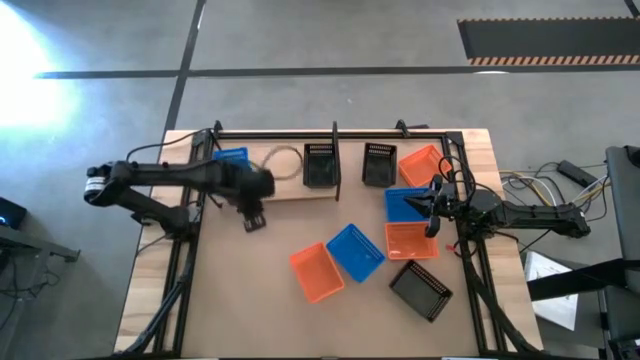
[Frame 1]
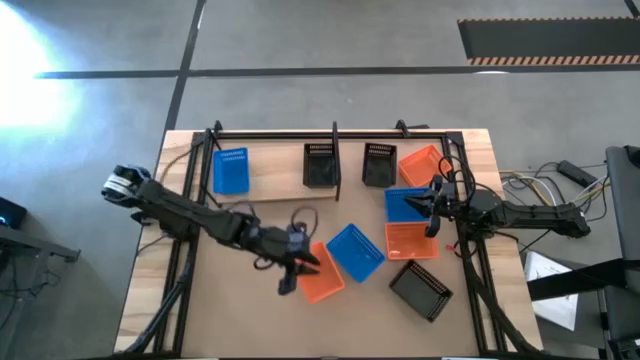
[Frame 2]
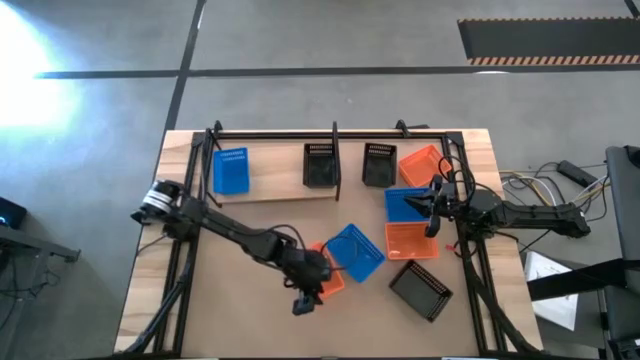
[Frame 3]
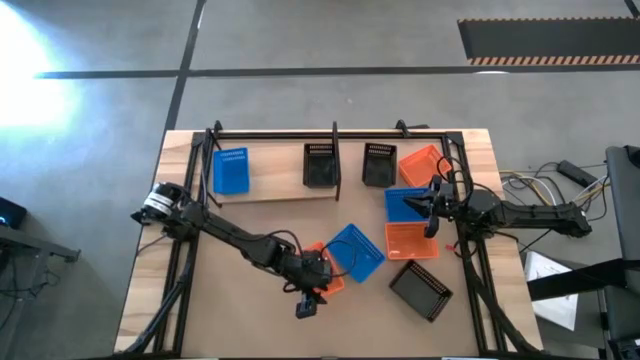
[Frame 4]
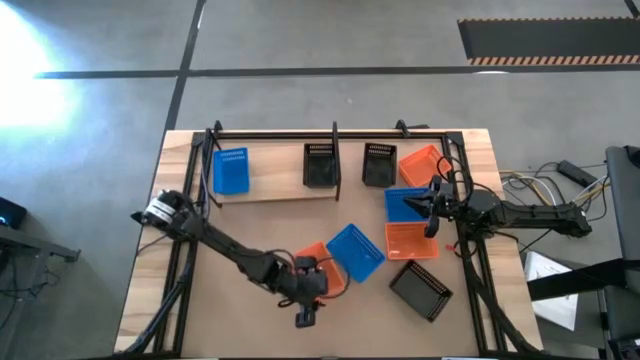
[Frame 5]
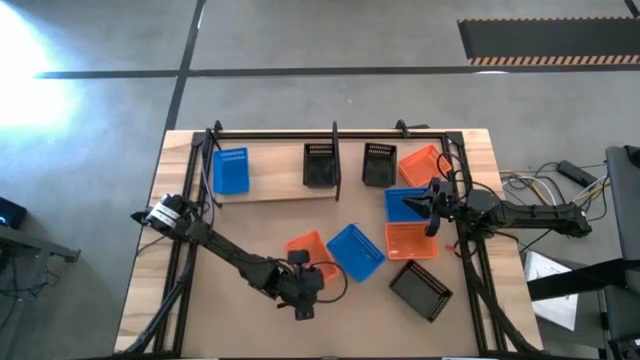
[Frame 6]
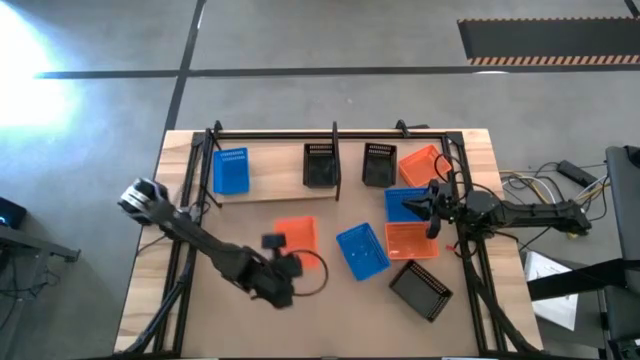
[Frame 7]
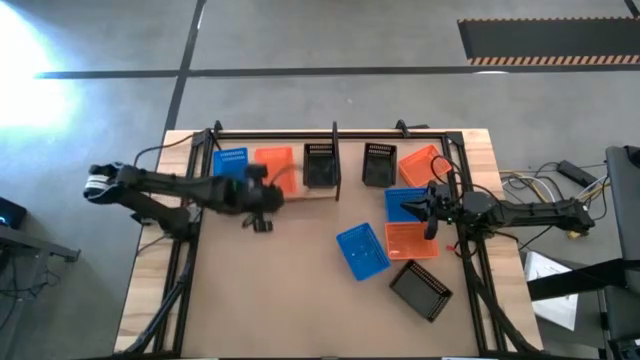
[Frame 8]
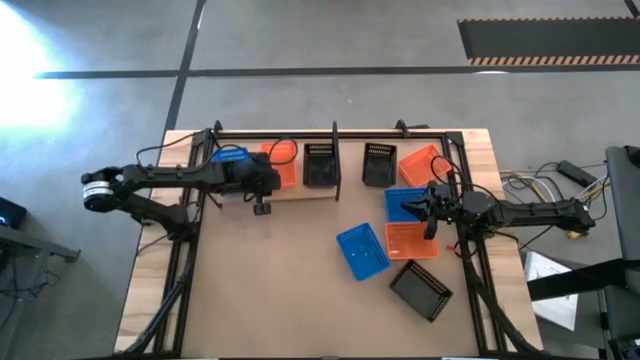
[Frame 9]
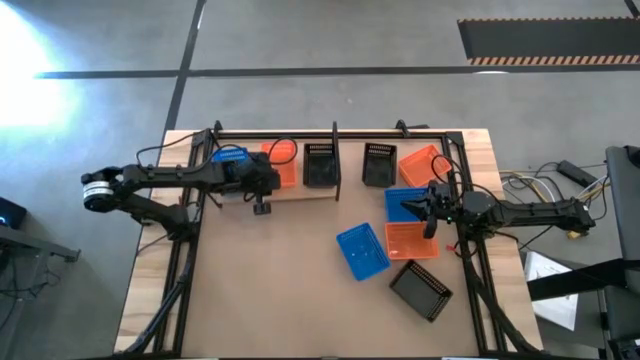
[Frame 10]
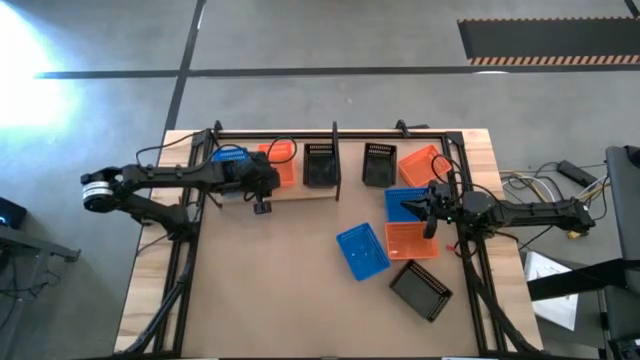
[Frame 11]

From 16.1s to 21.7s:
Task: Stack baskets on shelf by color
Put the bottom left orange basket on the shelf

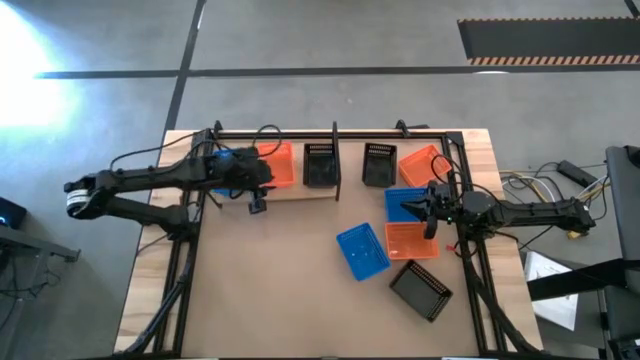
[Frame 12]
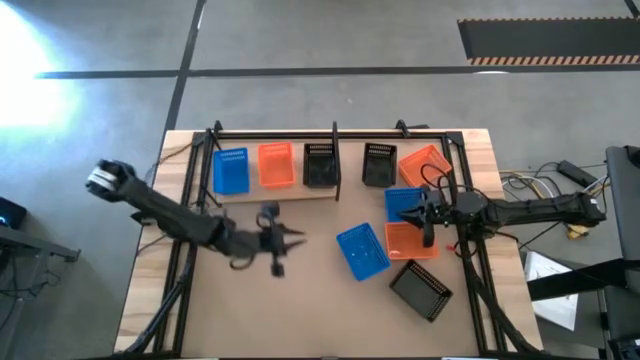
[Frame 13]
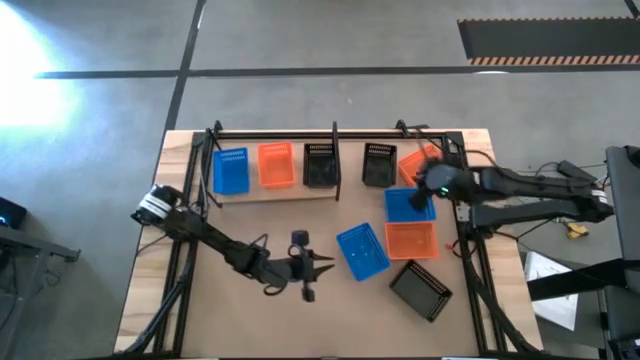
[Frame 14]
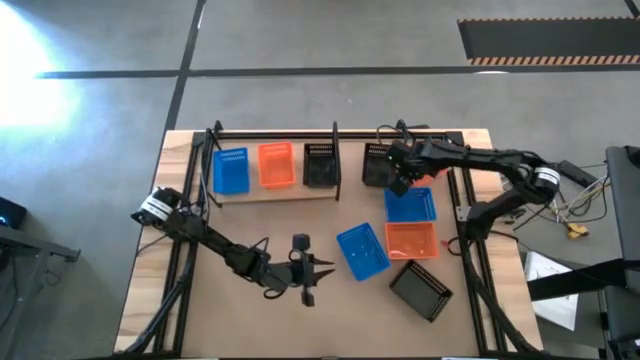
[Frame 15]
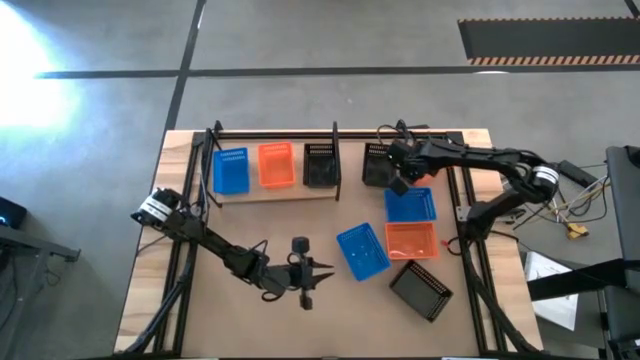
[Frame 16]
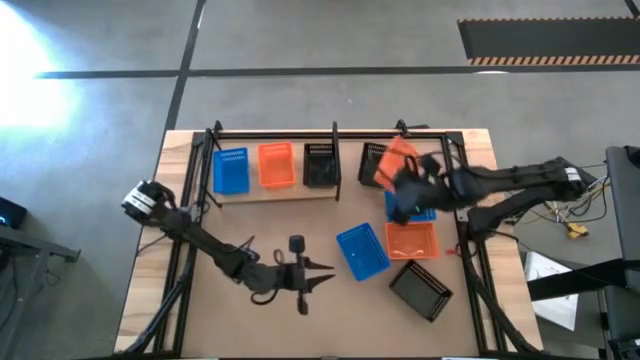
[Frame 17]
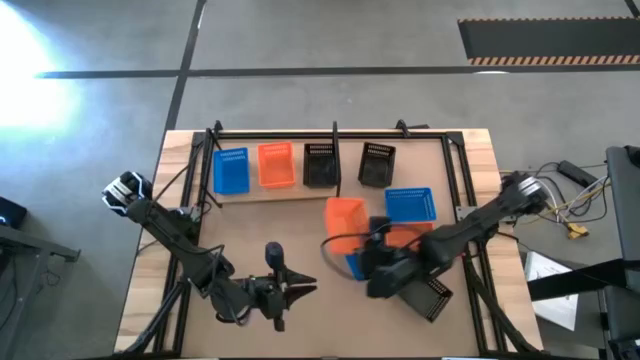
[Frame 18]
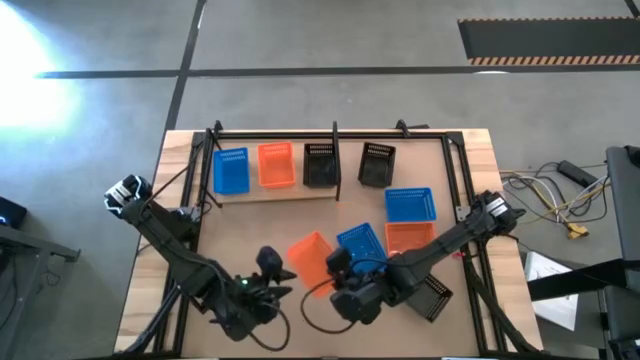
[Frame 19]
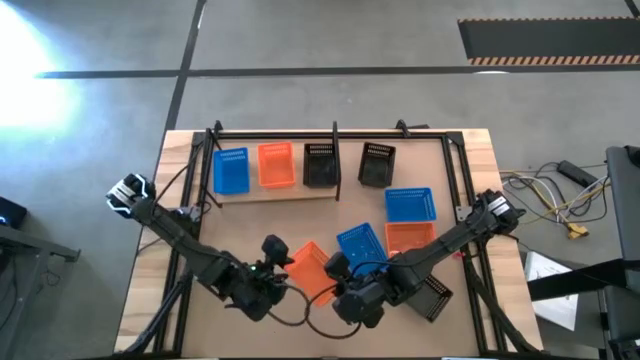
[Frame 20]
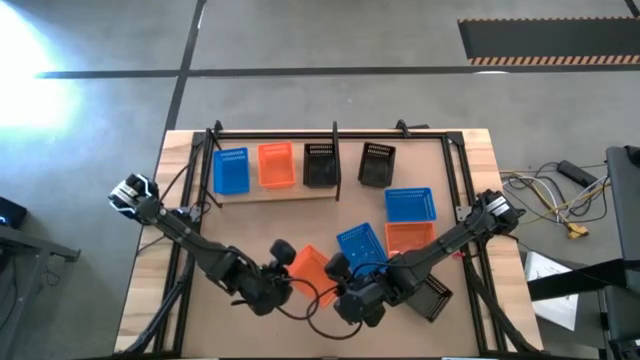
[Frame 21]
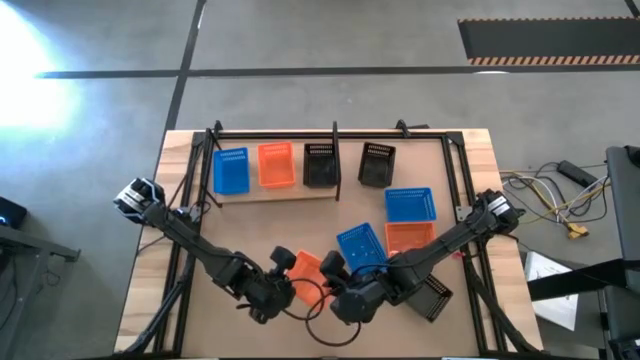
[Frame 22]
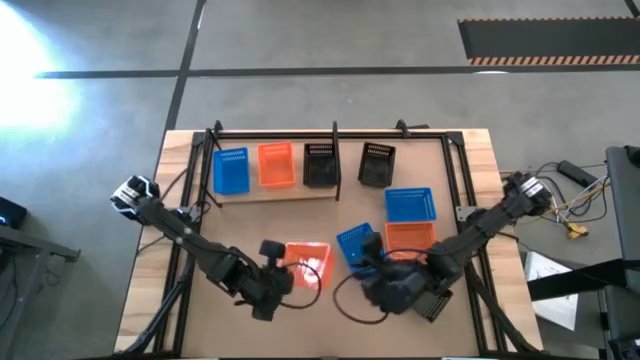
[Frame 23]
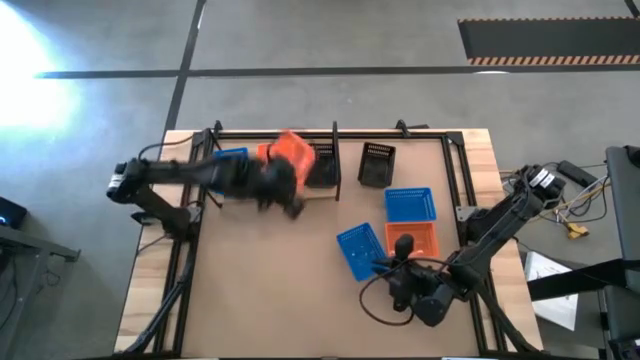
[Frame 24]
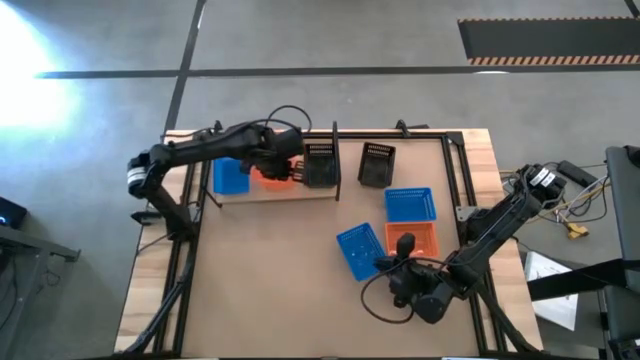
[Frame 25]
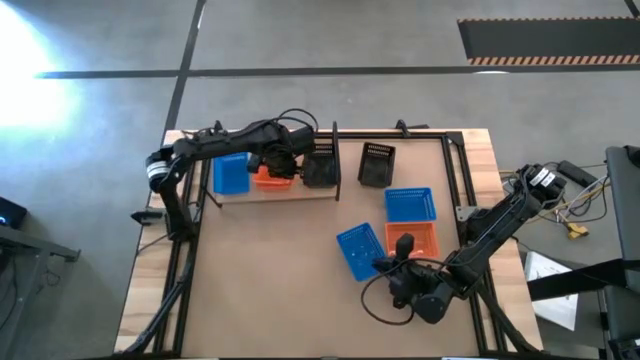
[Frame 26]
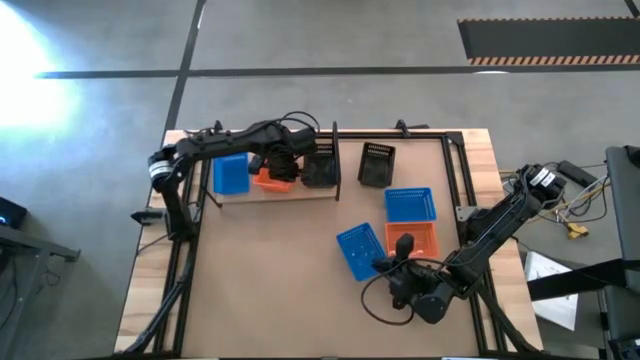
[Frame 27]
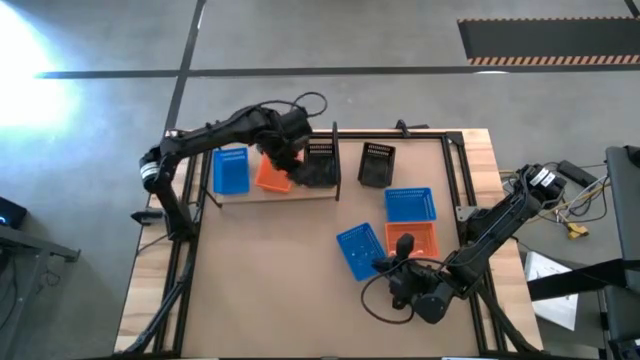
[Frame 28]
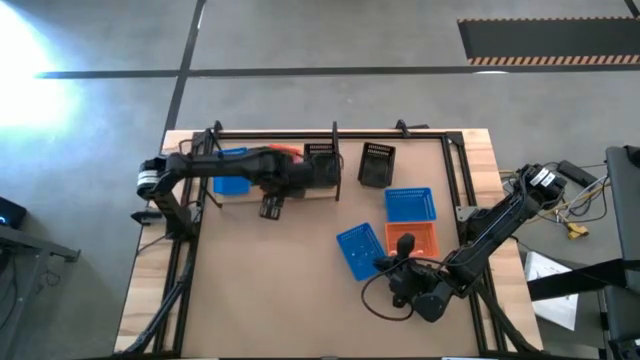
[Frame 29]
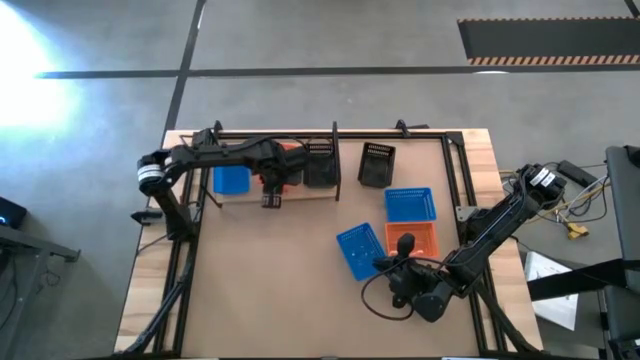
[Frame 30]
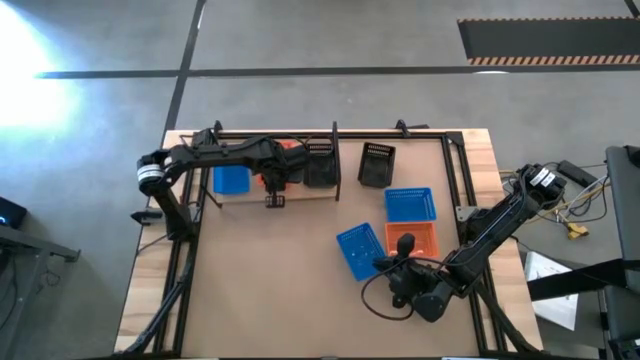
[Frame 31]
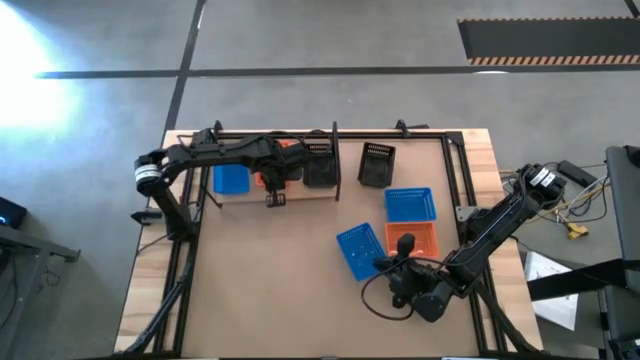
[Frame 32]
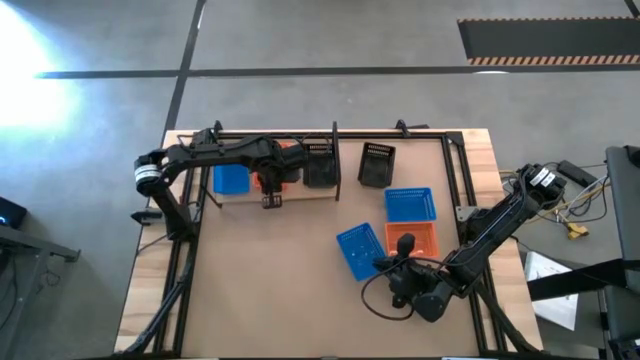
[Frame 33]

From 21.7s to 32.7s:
Stack the top orange basket on top of the other orange basket on the shelf

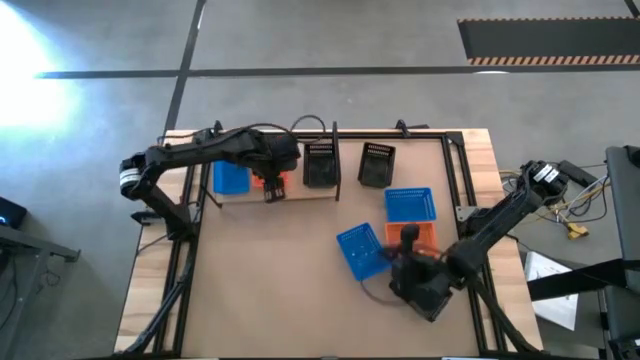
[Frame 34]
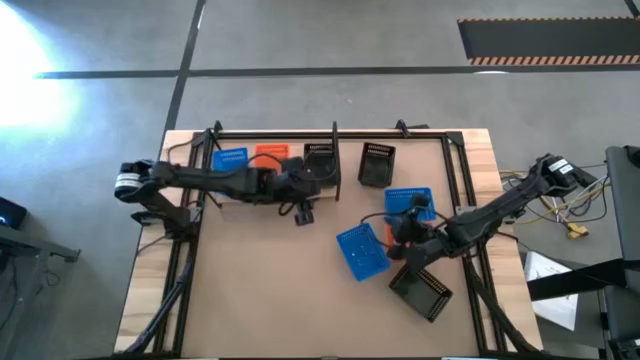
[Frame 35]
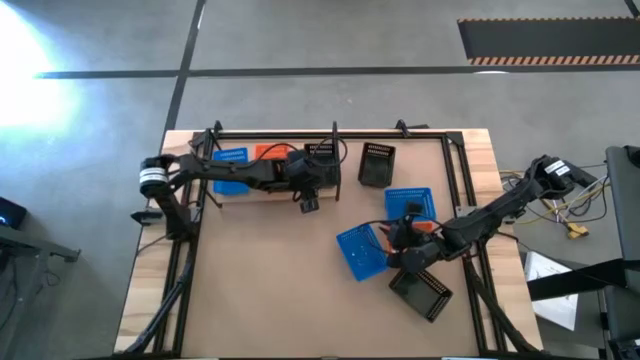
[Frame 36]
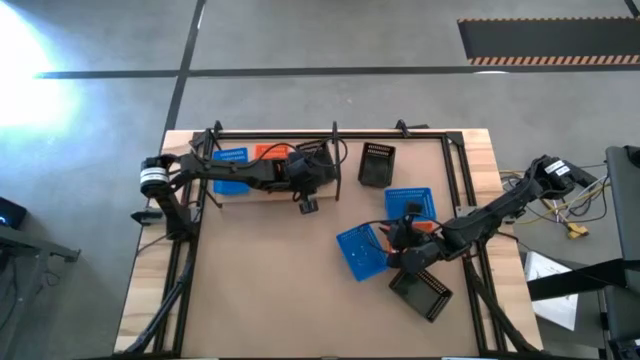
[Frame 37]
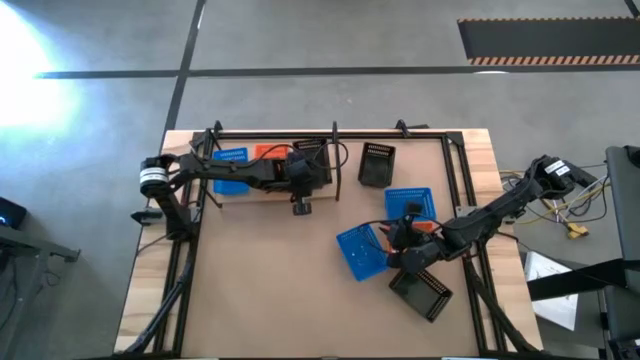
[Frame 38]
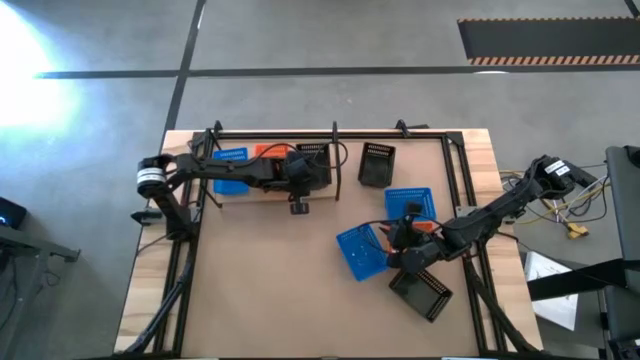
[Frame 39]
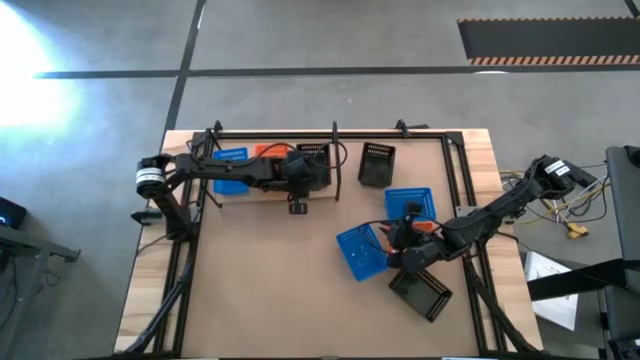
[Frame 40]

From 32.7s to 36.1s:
Adjust the black basket on the shelf

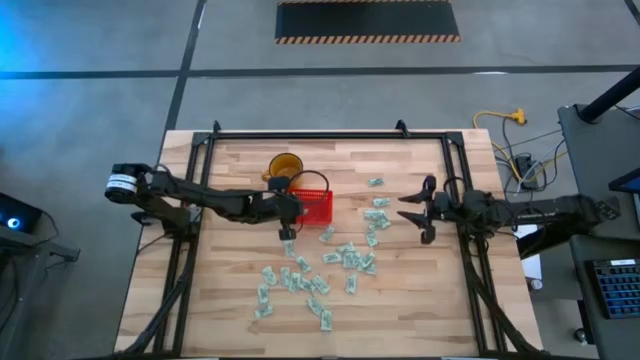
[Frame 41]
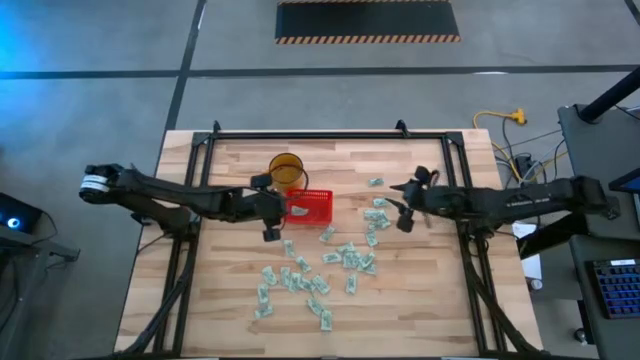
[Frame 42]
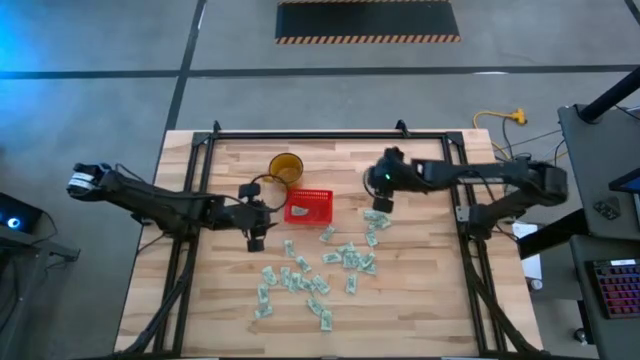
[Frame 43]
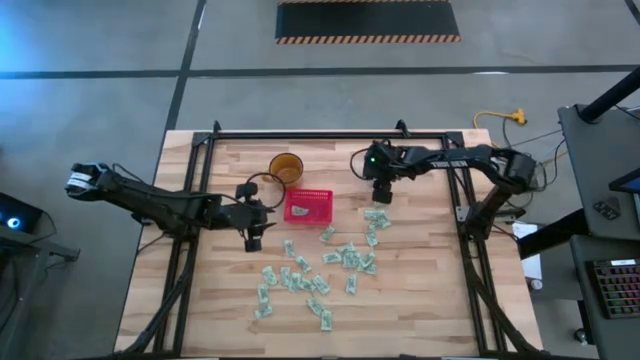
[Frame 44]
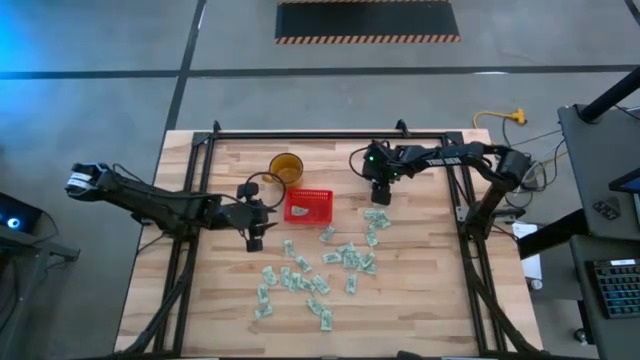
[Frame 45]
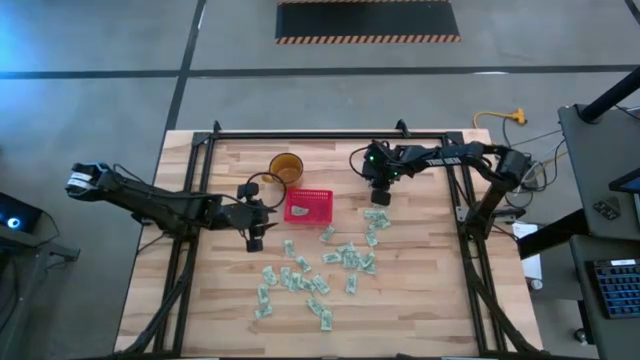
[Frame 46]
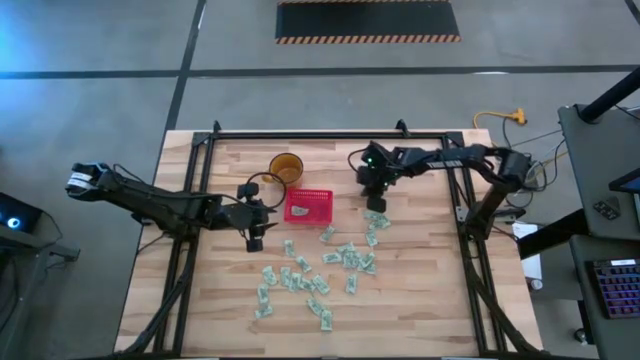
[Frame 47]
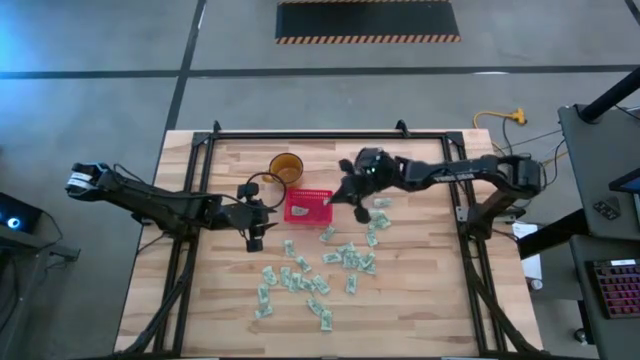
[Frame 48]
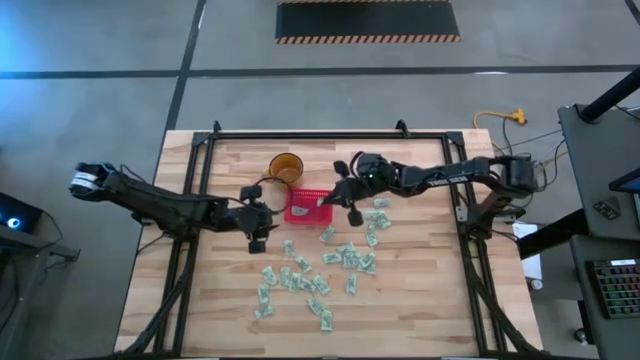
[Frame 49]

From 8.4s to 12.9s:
Task: Pick and place Stevia / Truvia into bins
Put the gray stevia packet into the red basket
